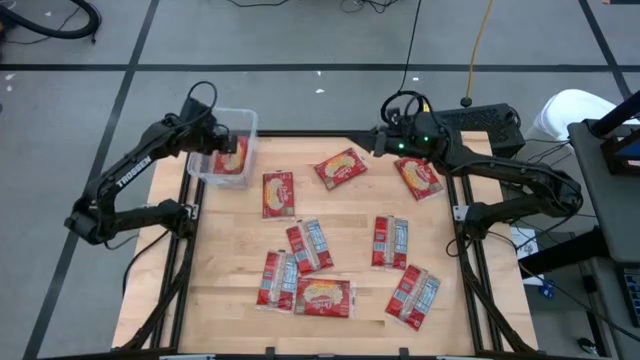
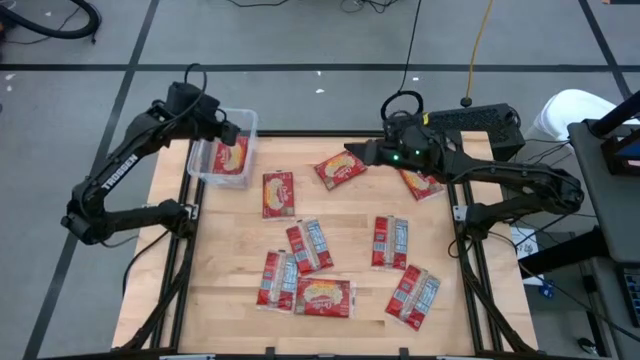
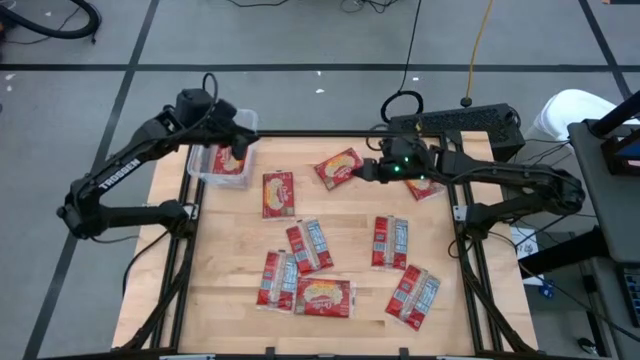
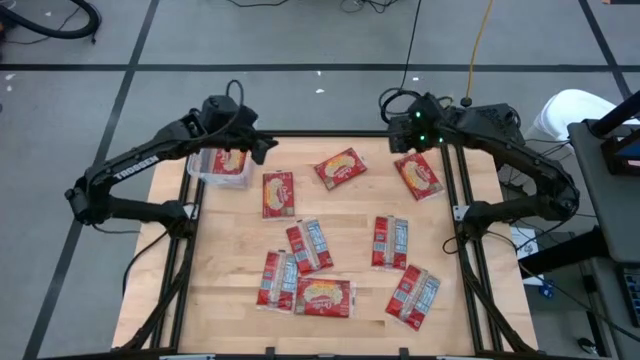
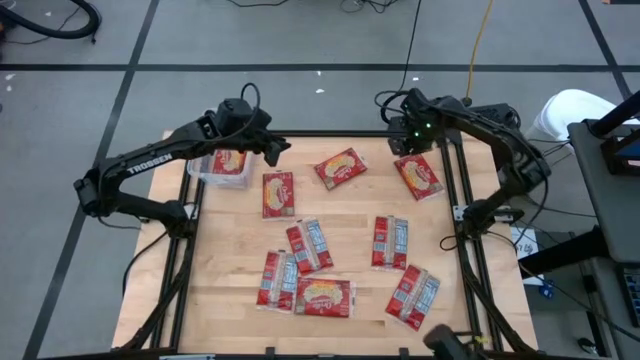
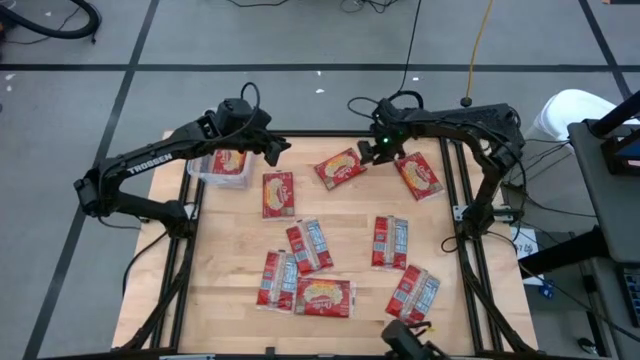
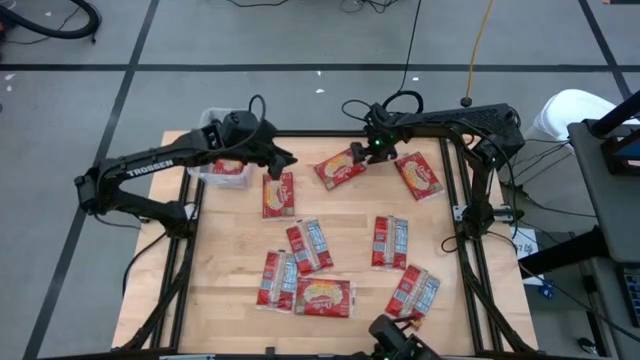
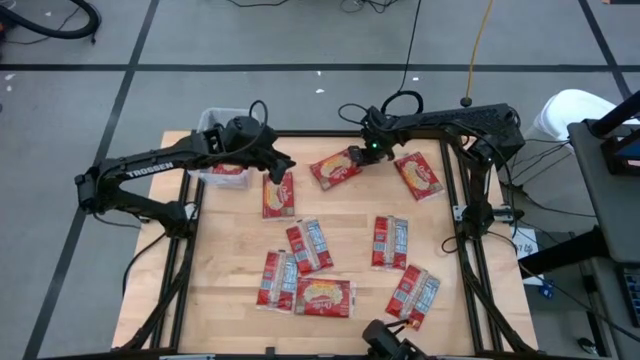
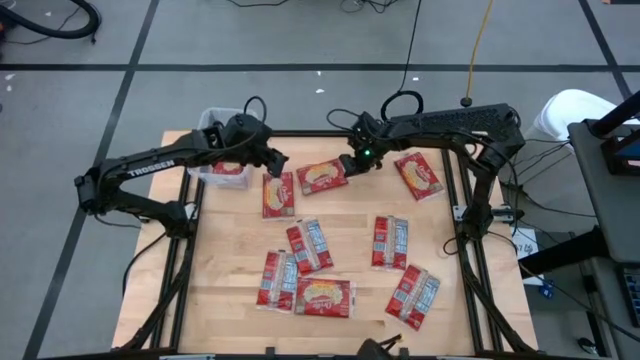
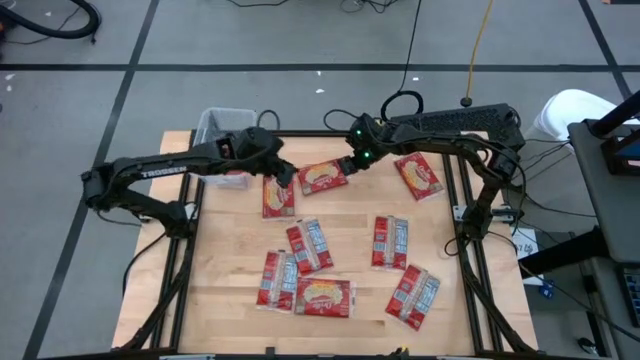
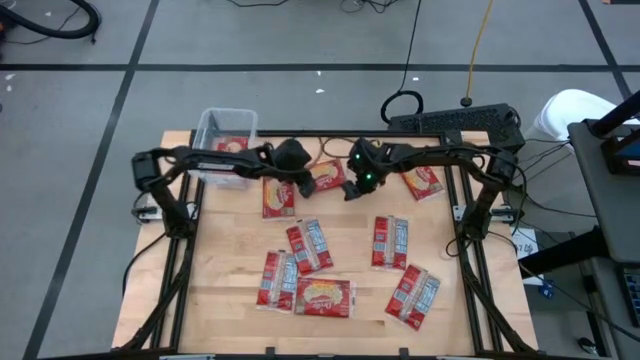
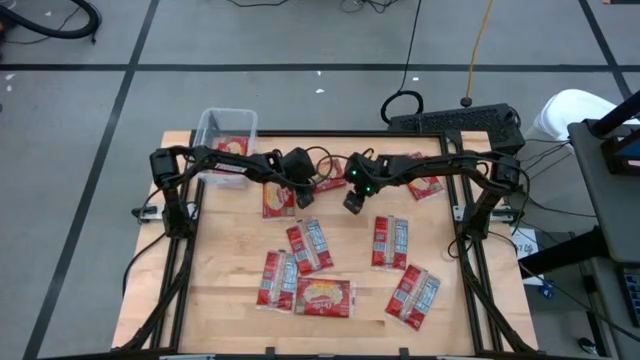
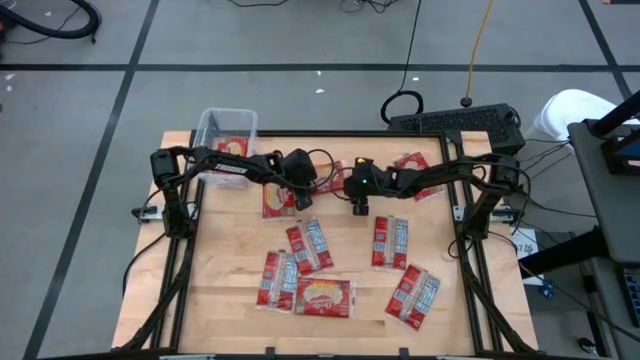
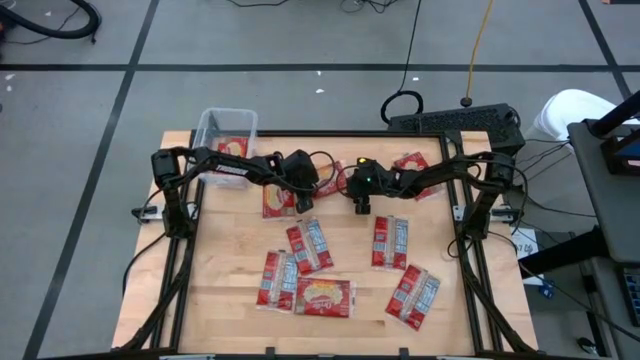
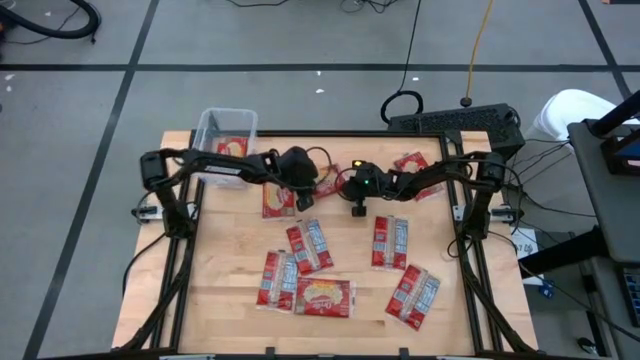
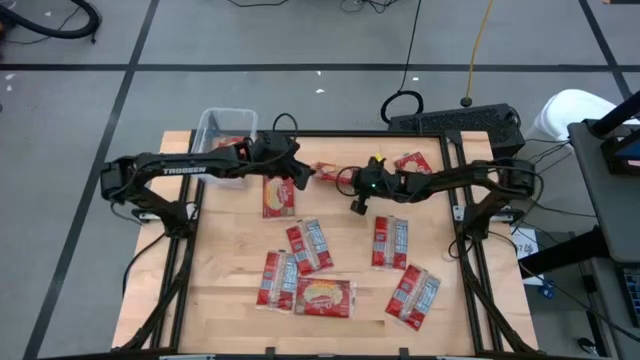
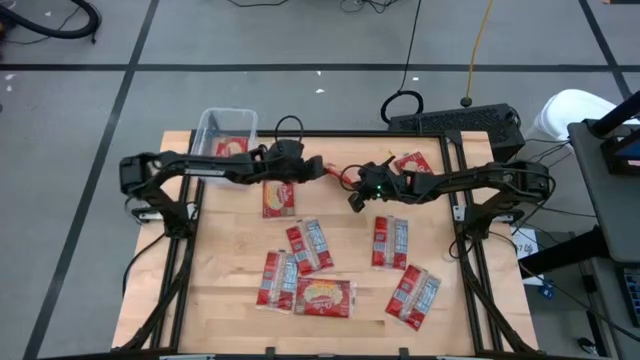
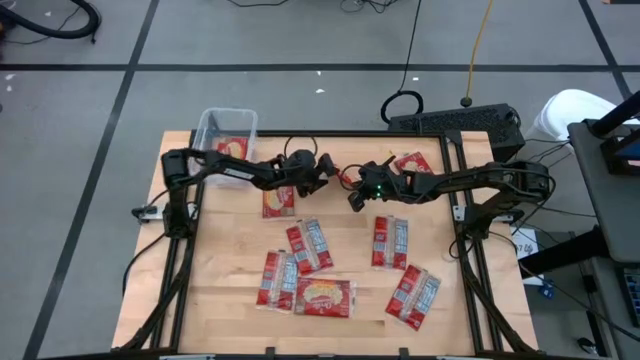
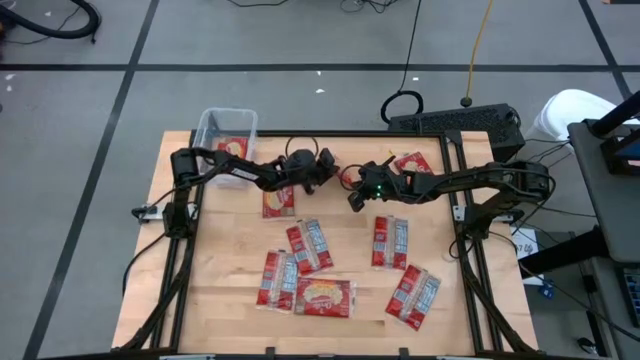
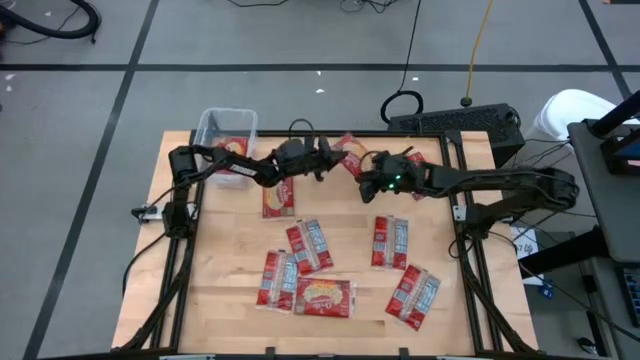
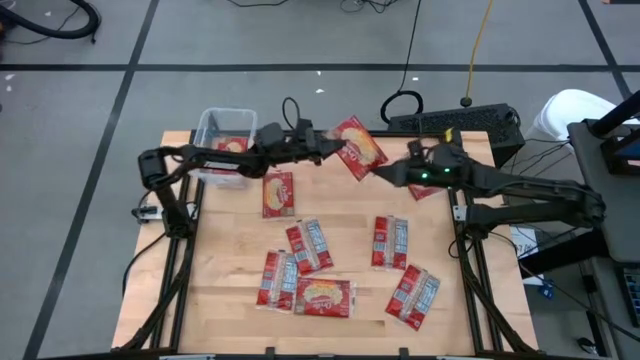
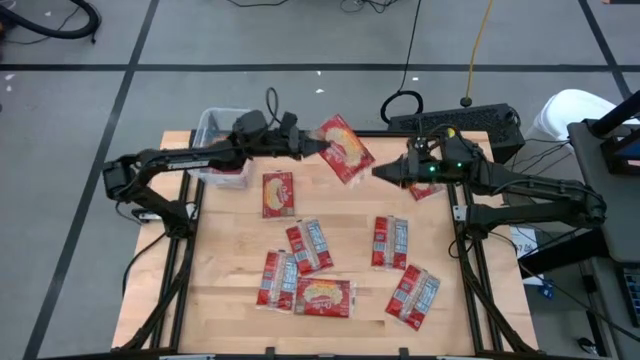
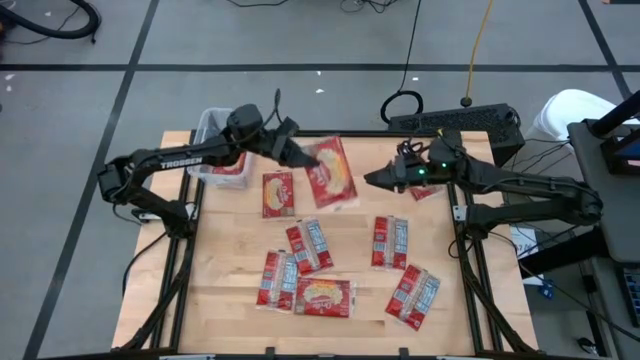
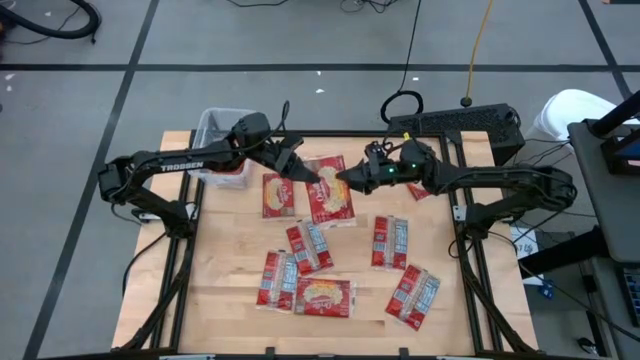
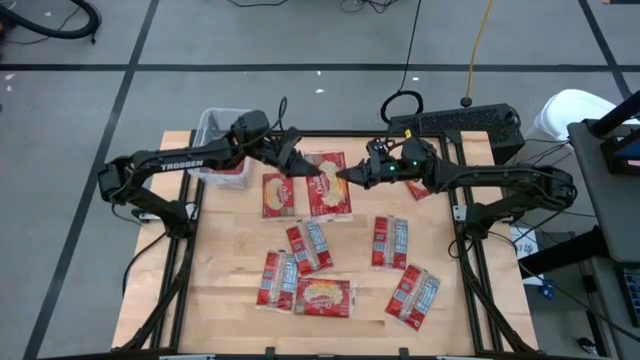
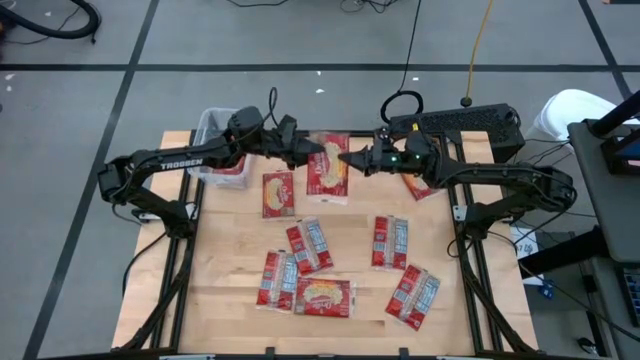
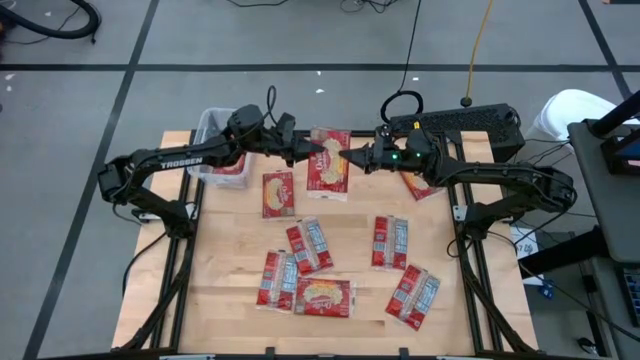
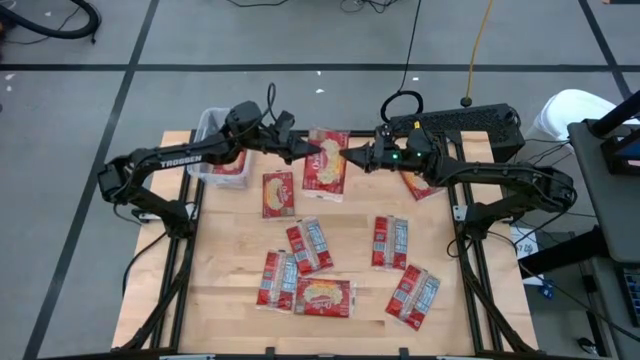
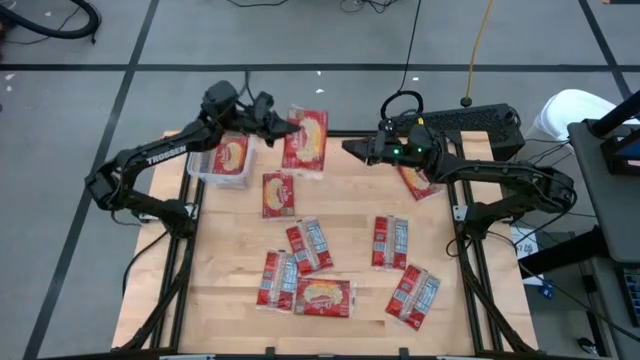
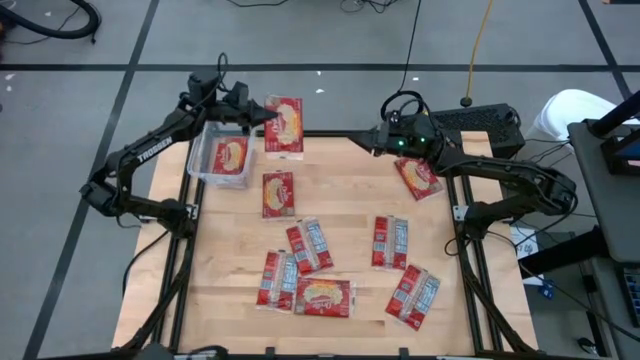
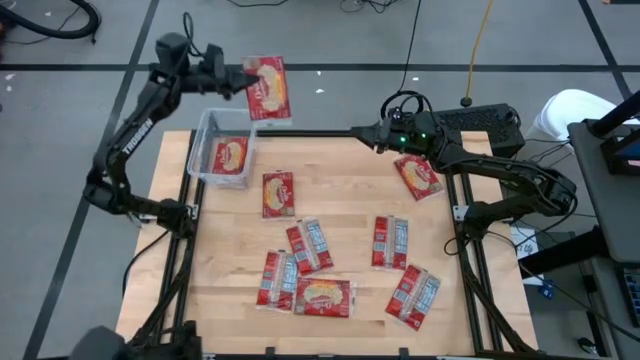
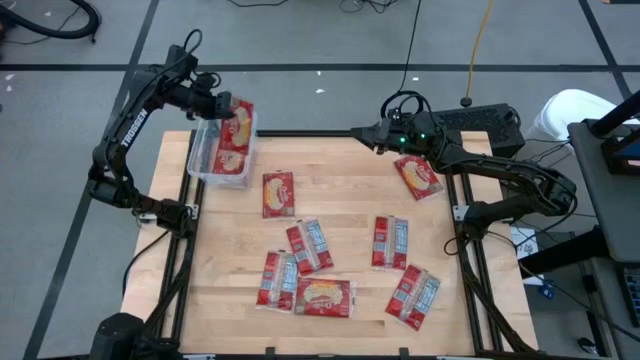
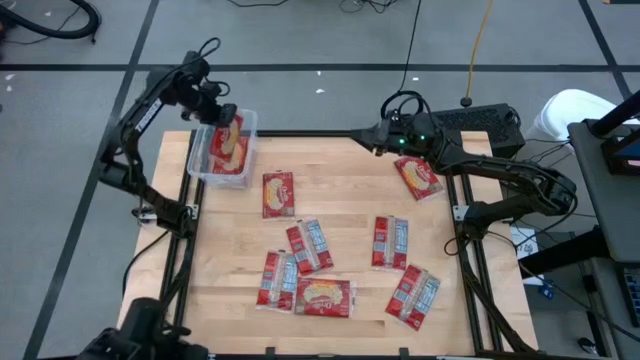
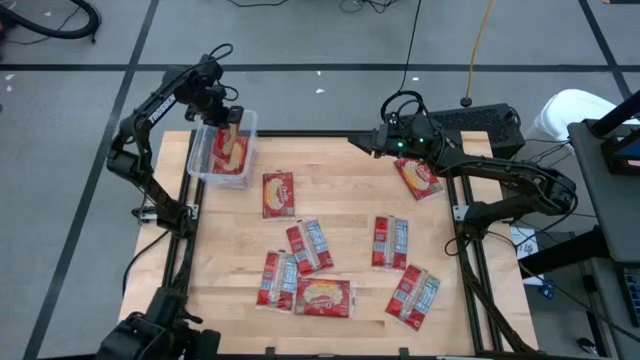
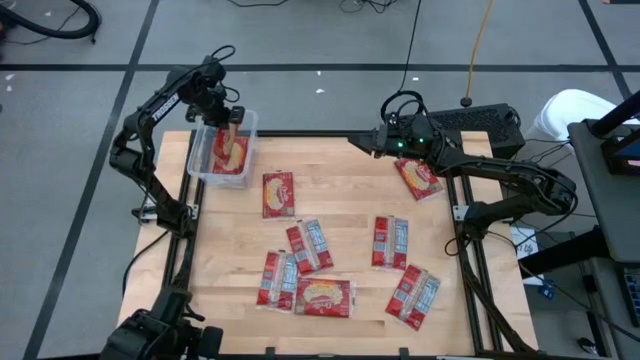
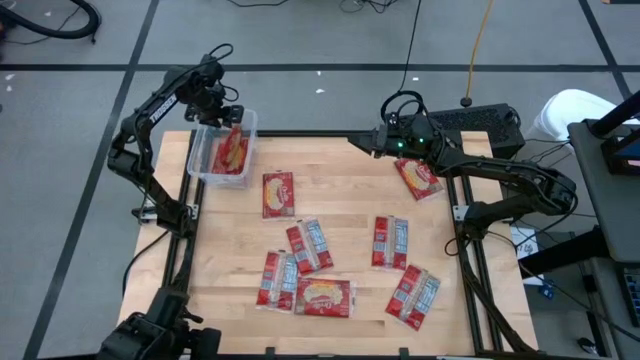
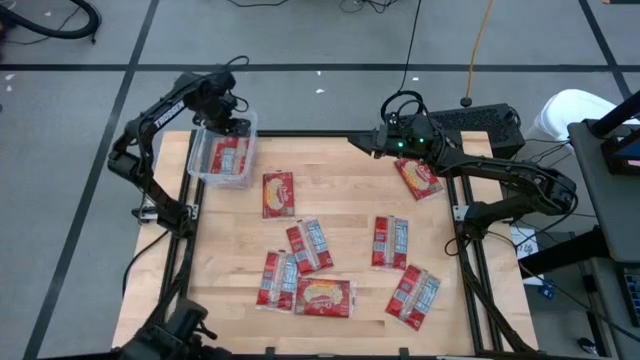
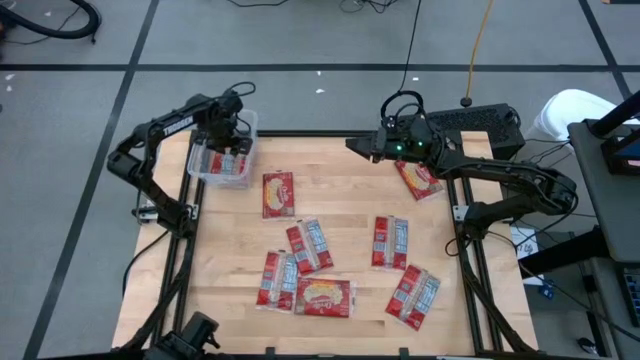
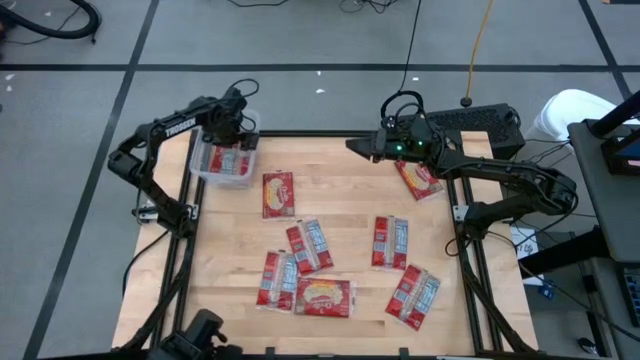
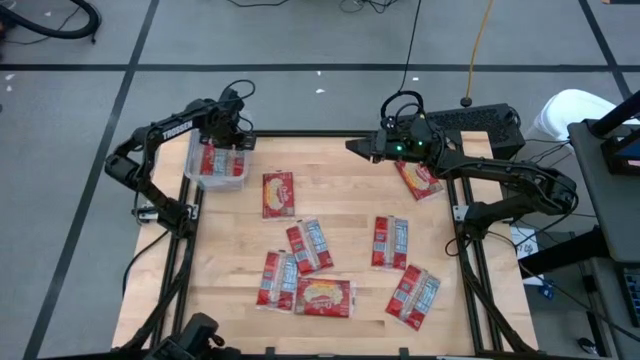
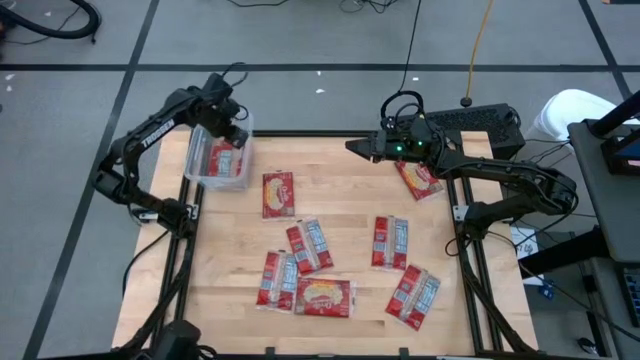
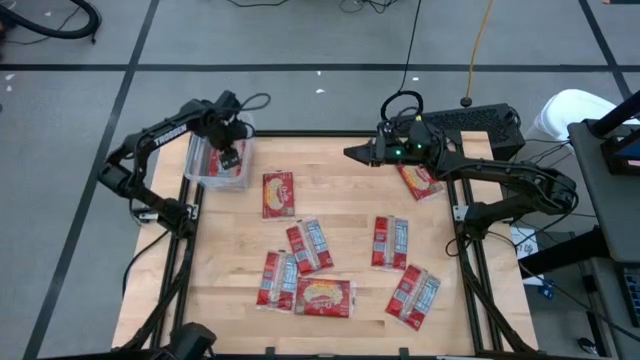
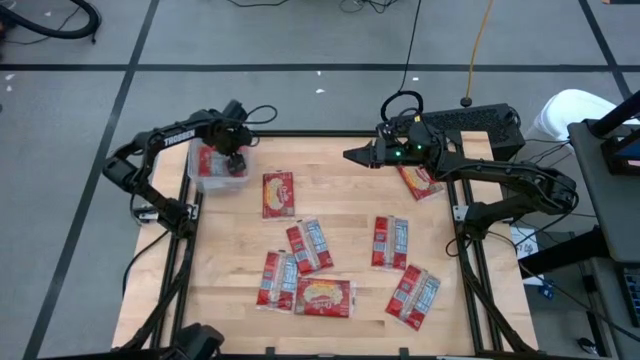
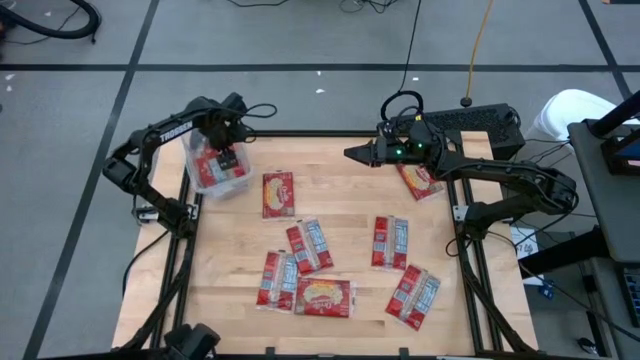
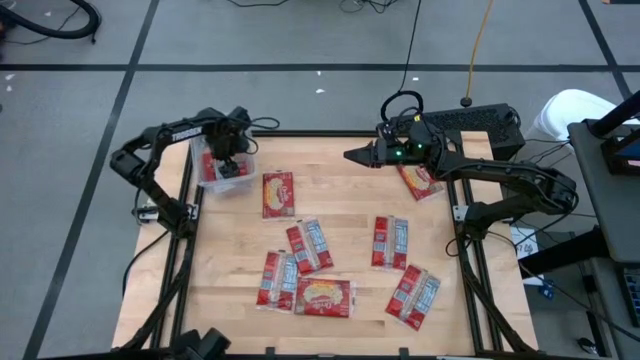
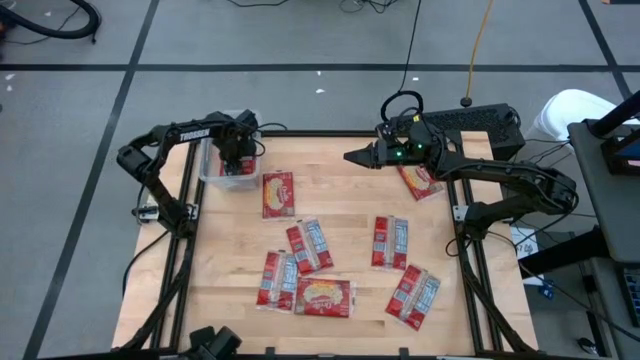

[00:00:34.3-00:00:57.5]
Task: Sort popcorn bags into baskets
Put the red popcorn bag into the transparent container
